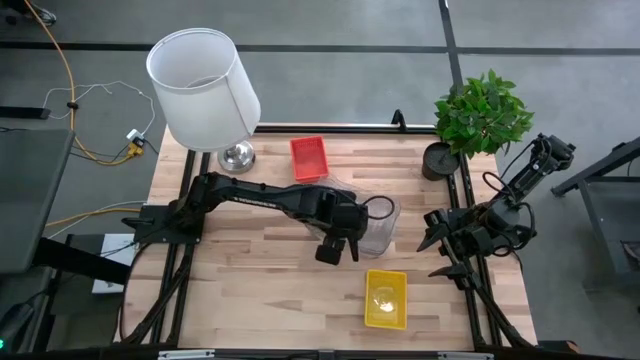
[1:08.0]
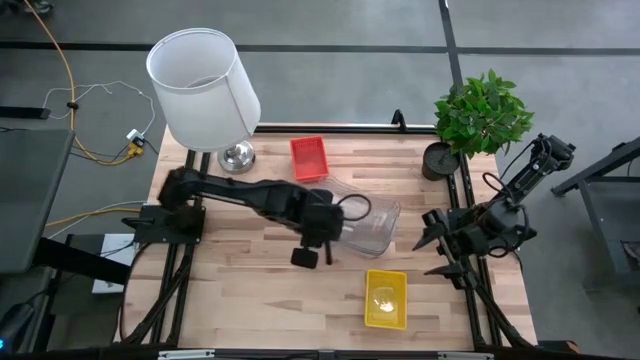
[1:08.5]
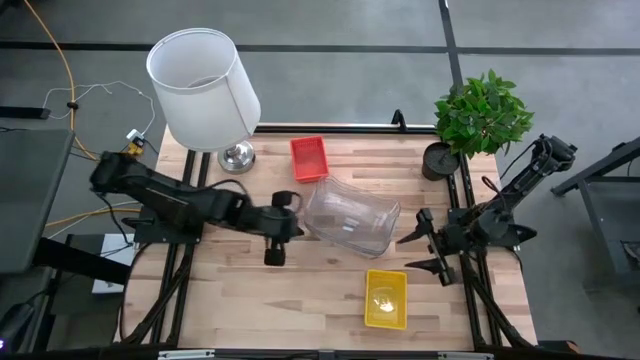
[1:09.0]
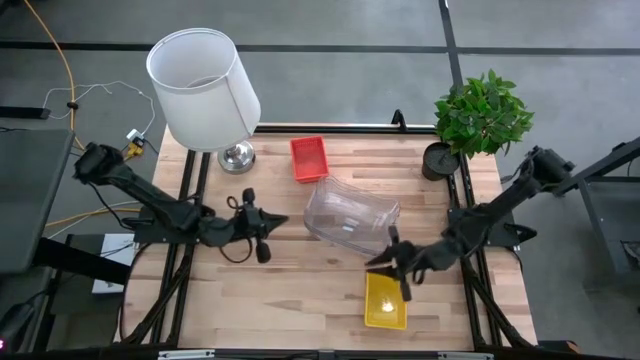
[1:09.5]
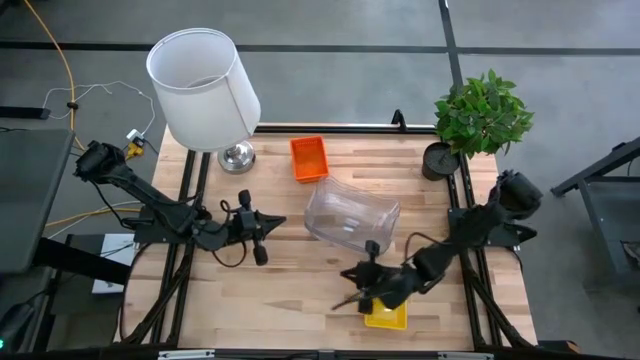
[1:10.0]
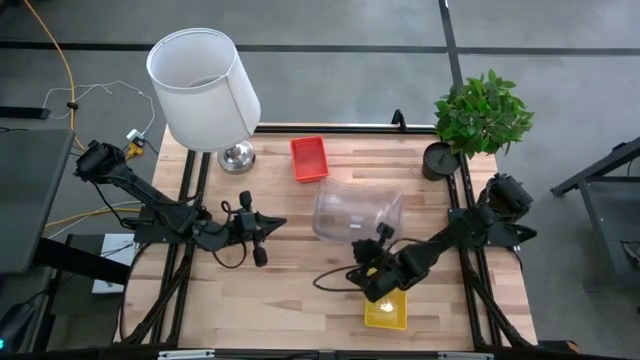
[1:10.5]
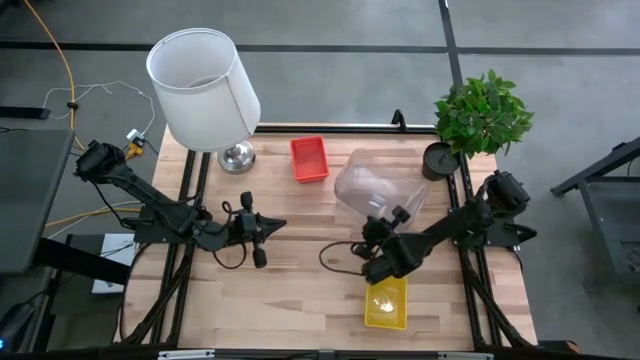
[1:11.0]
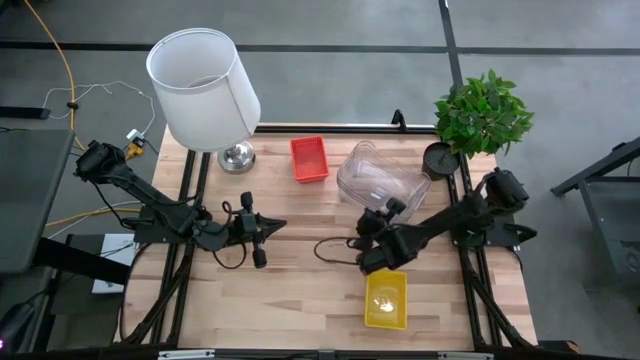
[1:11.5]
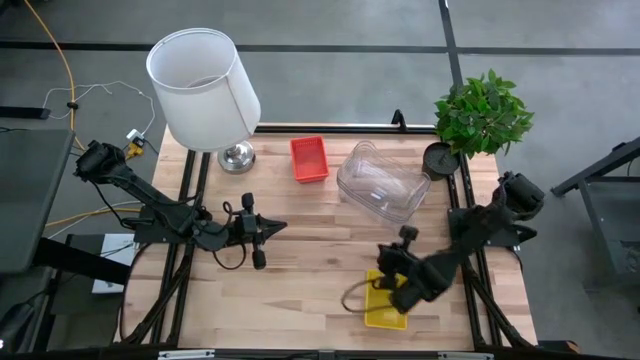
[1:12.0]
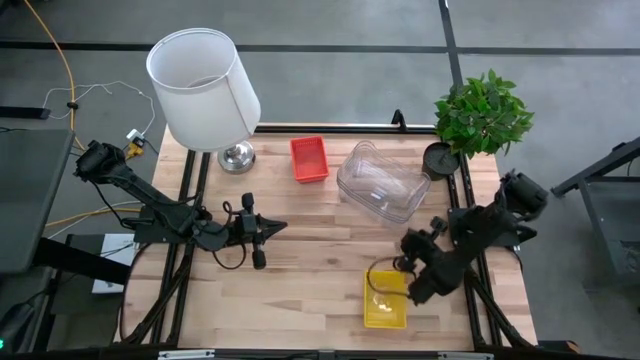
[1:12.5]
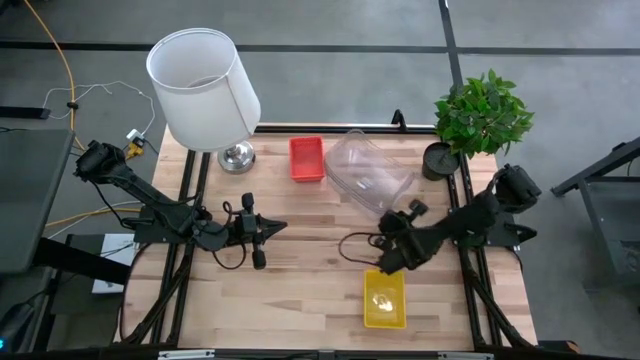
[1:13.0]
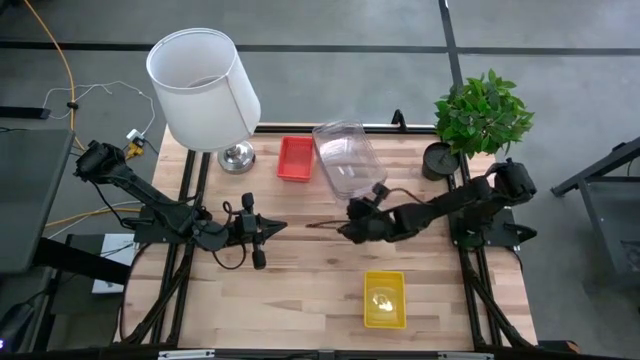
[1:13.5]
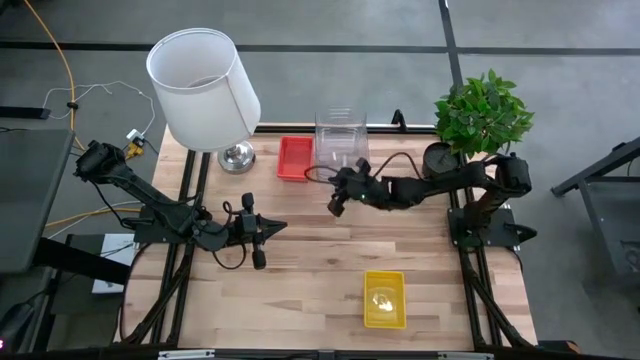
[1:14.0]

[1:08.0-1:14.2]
Move the stacked transparent bins to the top center of the table

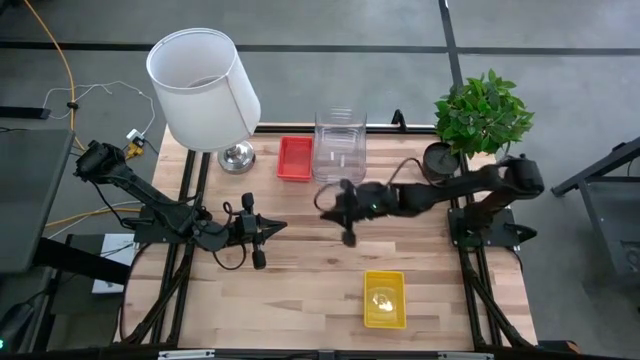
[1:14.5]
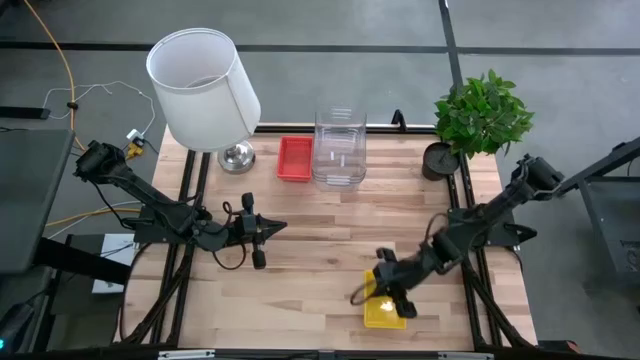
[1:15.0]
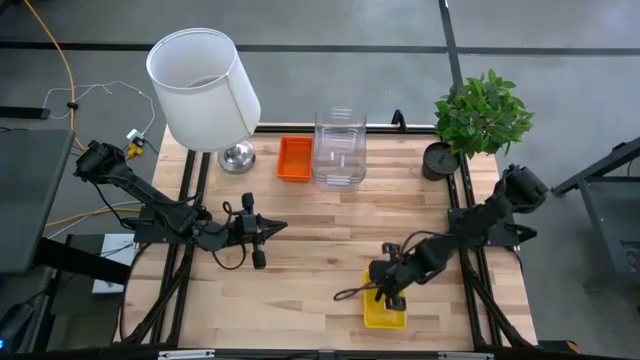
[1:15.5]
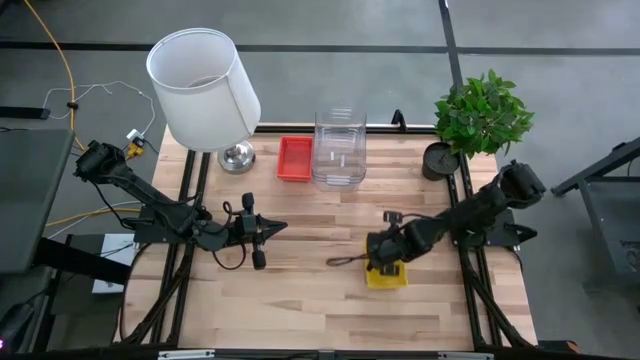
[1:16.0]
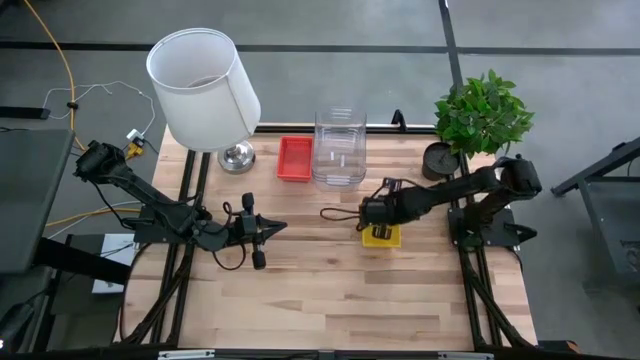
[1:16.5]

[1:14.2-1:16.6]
Move the stacked yellow bins to the center of the table

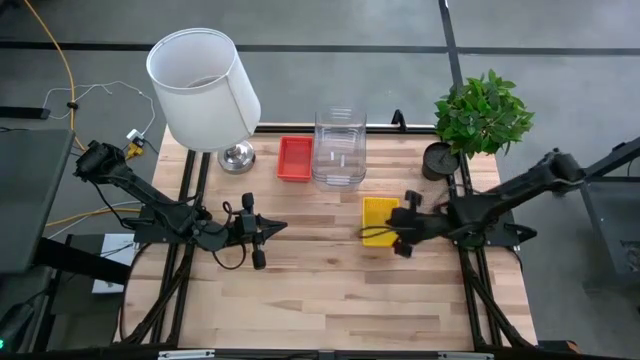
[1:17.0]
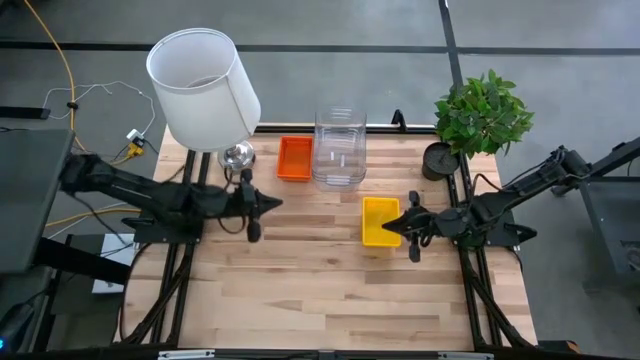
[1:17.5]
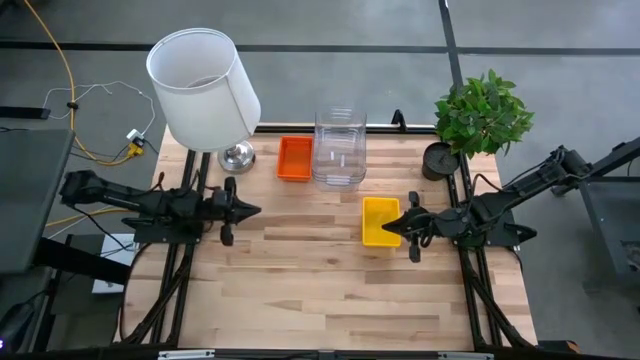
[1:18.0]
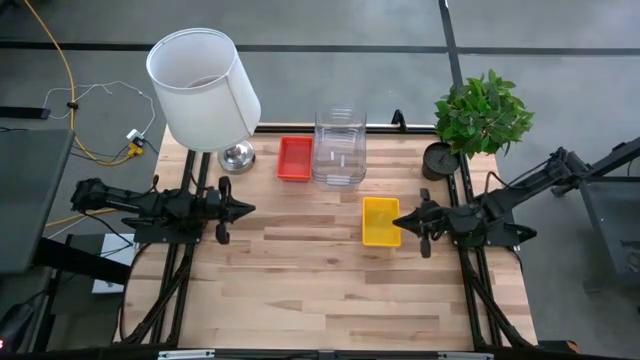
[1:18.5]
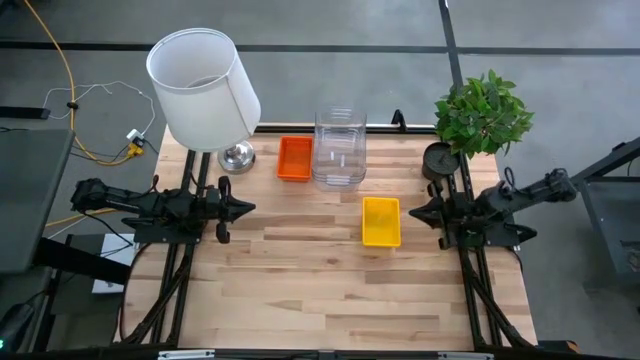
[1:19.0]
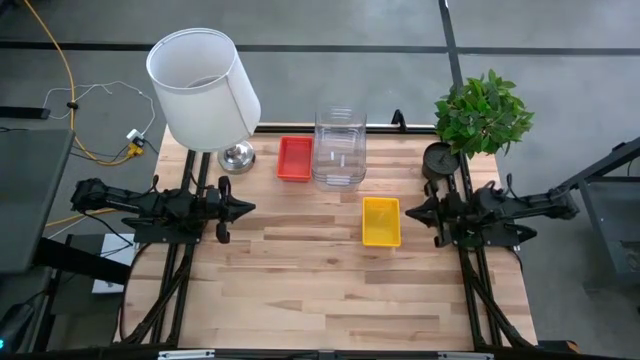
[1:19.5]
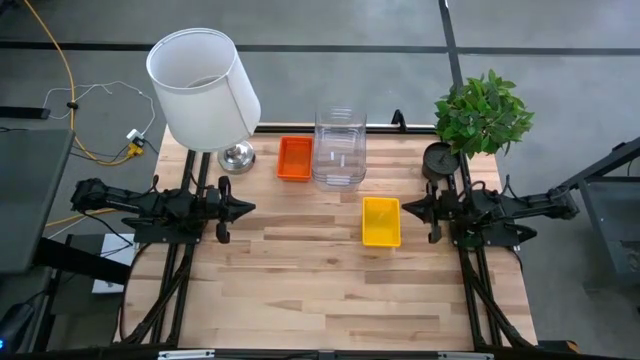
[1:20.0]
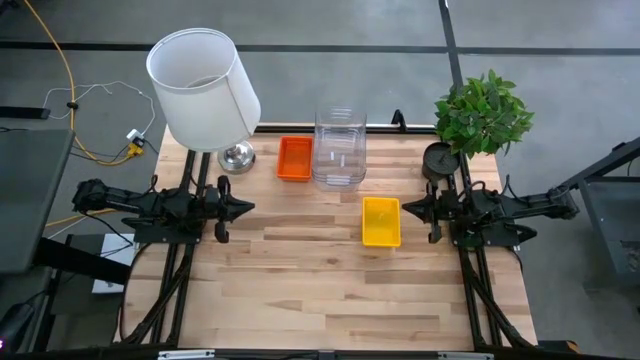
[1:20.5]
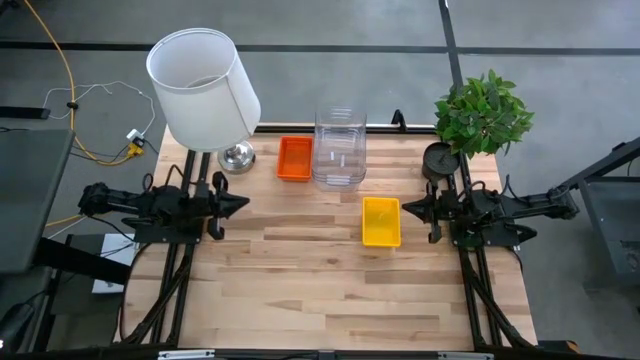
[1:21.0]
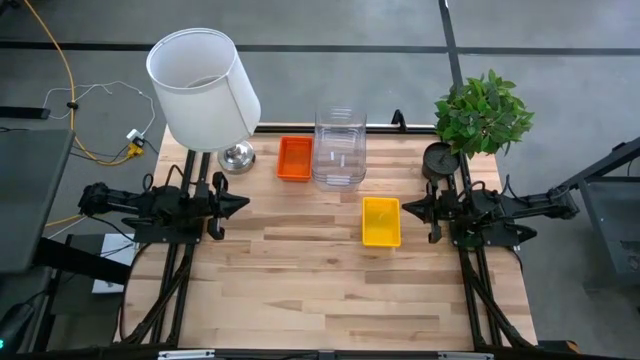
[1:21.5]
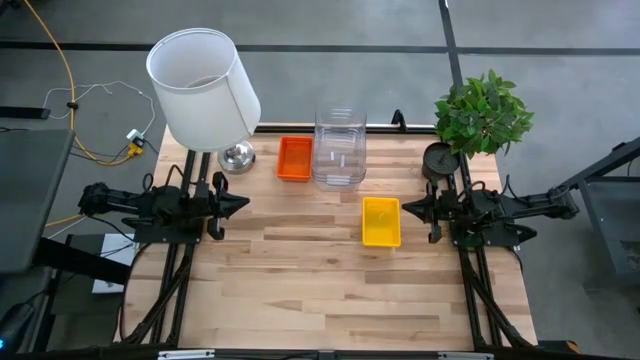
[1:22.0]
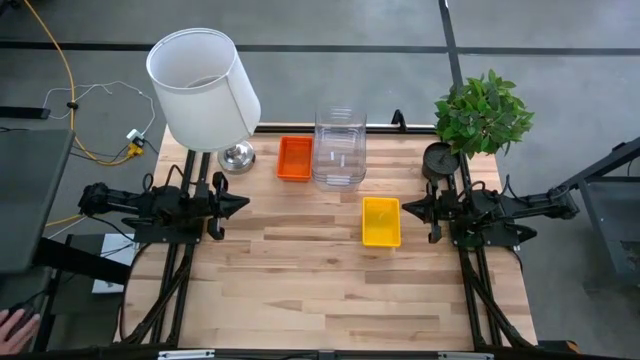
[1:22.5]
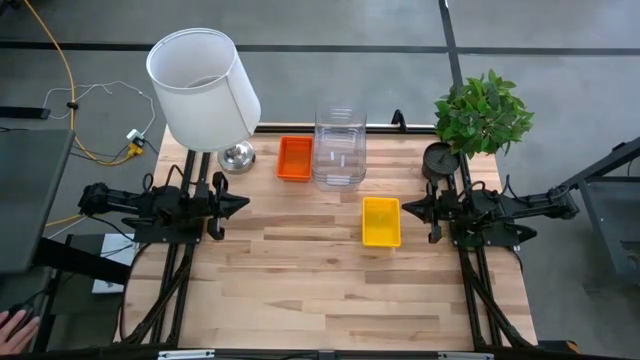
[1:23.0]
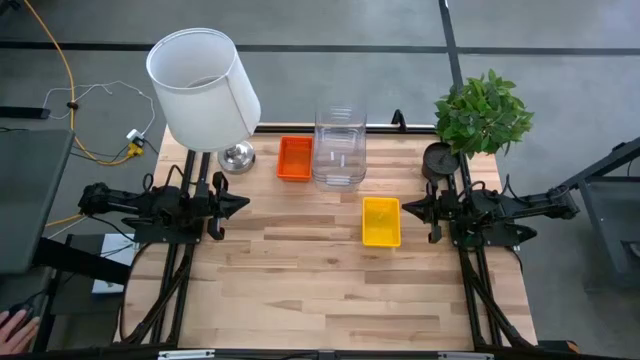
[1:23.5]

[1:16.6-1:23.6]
Return to Home Position

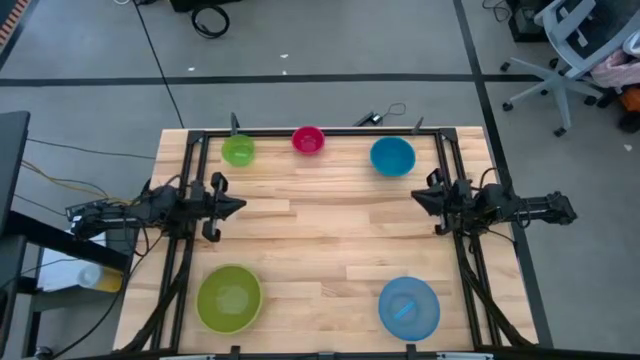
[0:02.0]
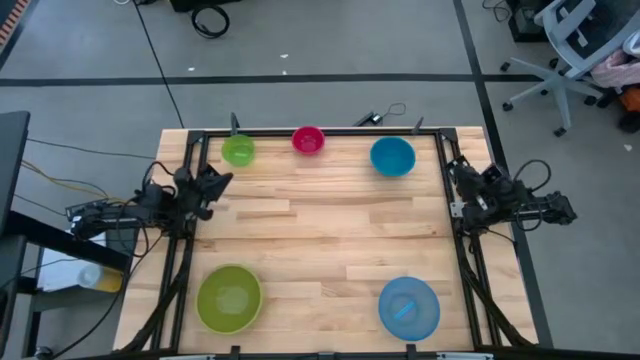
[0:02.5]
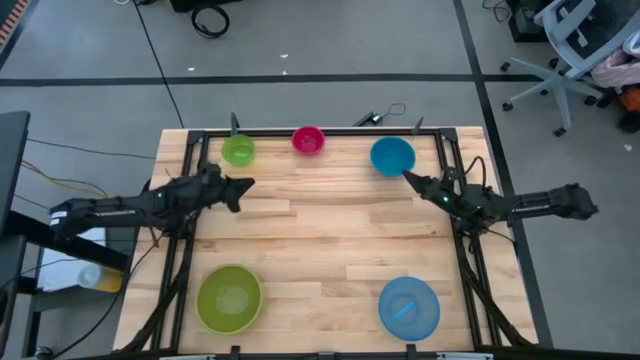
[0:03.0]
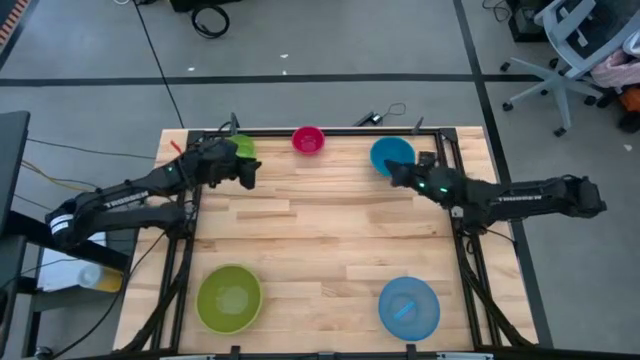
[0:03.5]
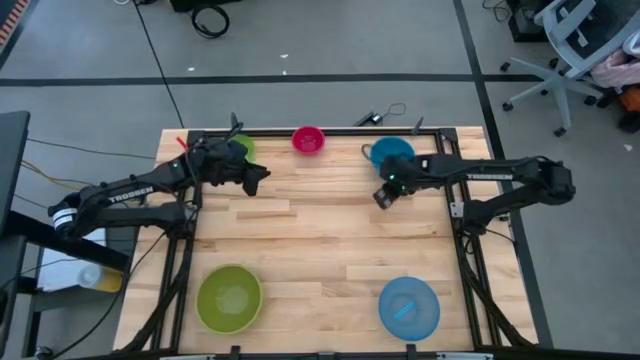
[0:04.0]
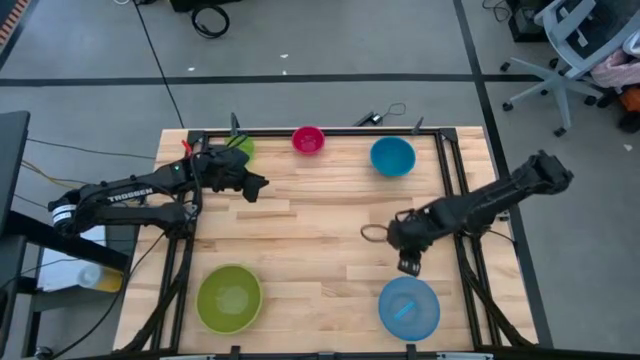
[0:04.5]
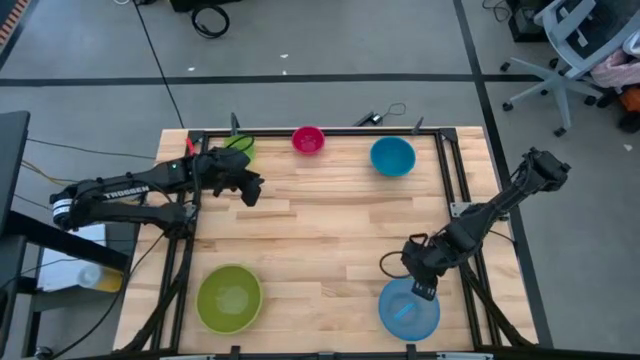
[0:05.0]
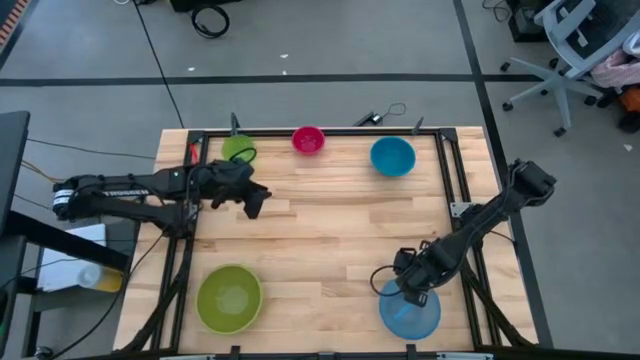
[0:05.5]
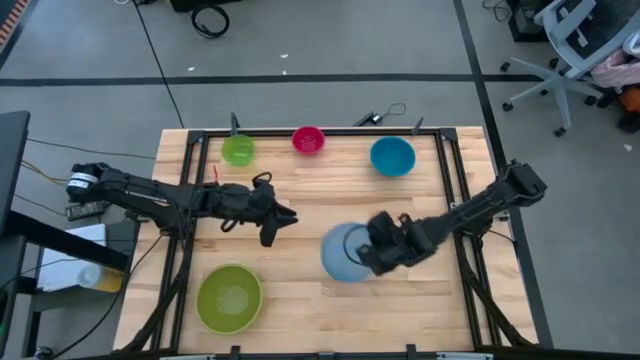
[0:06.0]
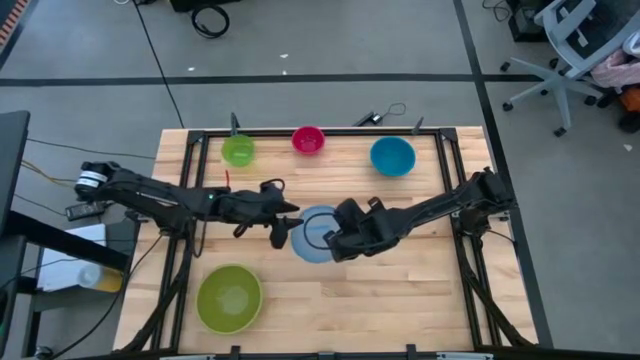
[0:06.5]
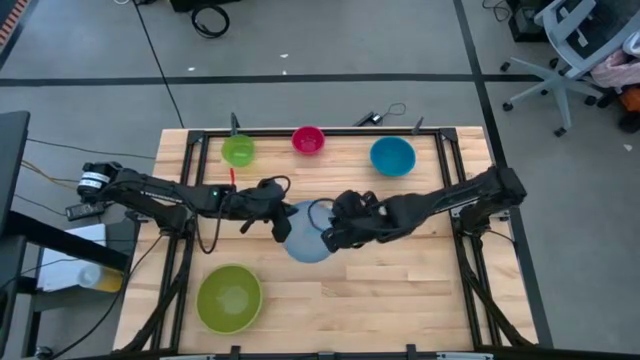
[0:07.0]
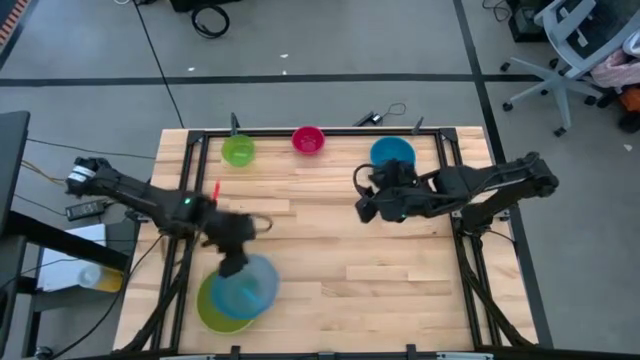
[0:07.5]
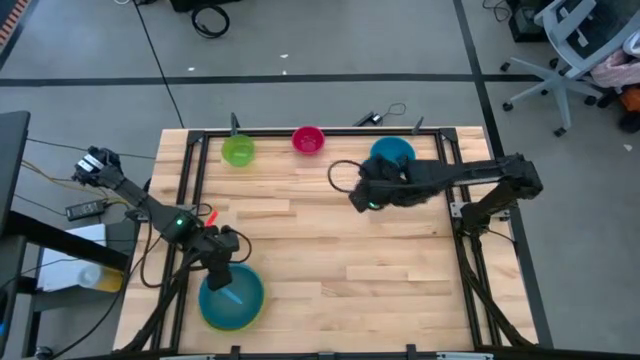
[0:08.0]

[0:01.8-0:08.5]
Stack the light blue bowl on top of the green bowl
